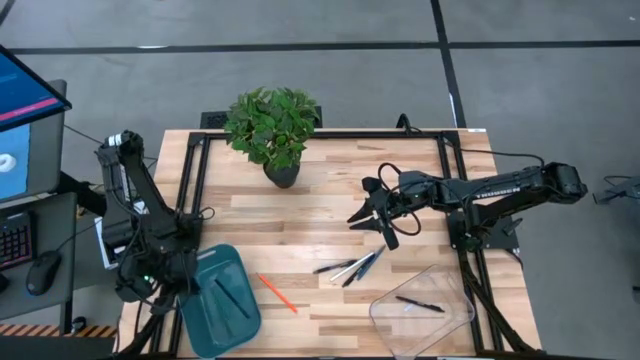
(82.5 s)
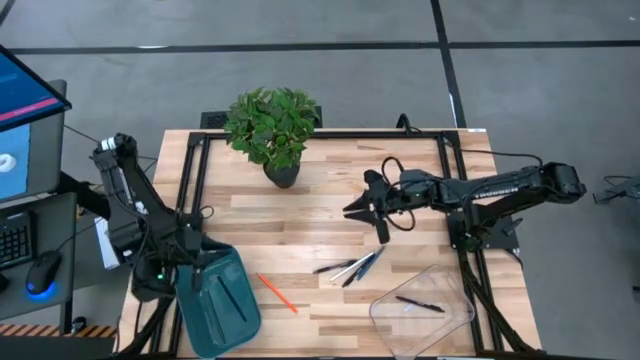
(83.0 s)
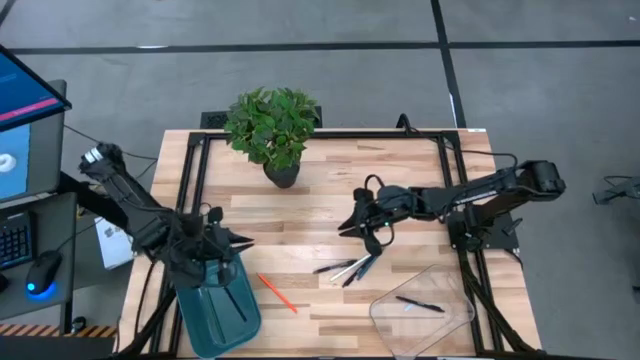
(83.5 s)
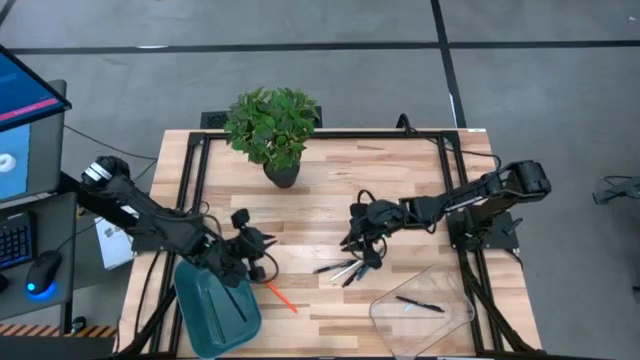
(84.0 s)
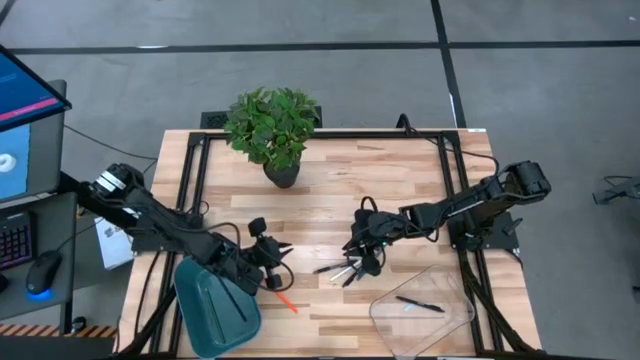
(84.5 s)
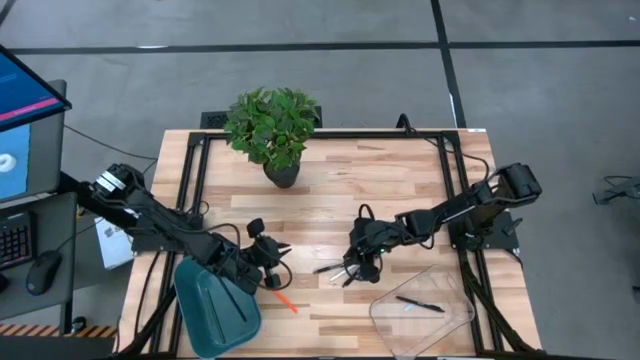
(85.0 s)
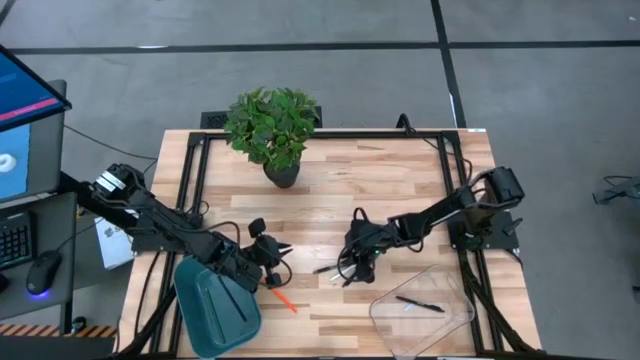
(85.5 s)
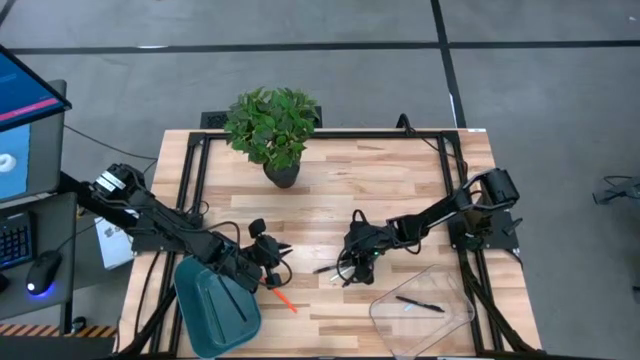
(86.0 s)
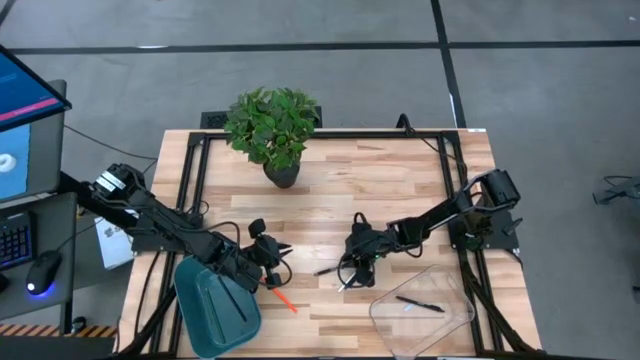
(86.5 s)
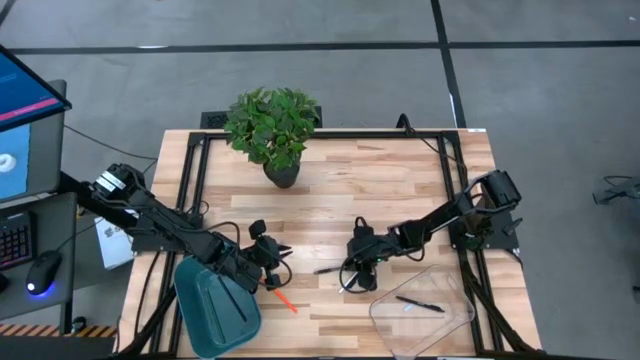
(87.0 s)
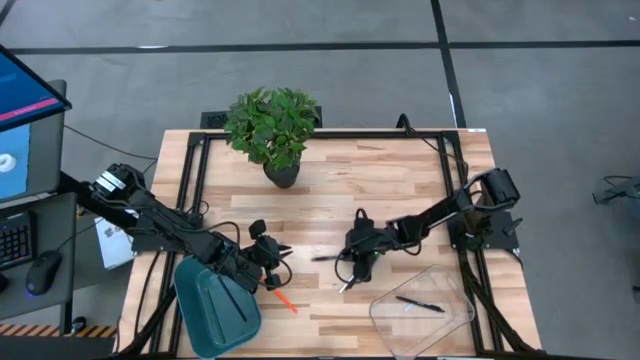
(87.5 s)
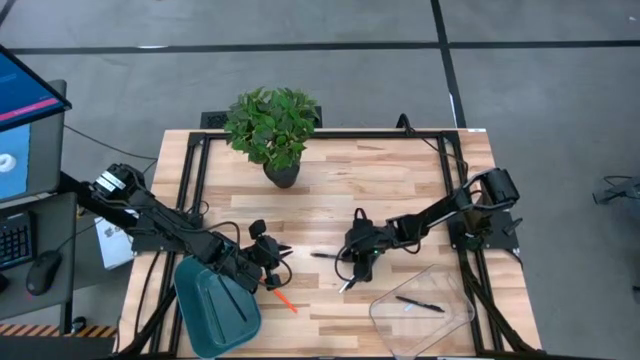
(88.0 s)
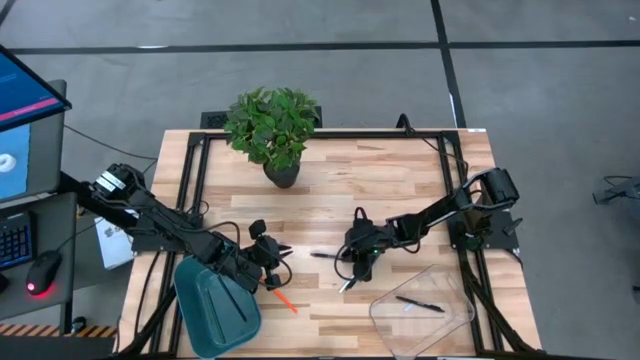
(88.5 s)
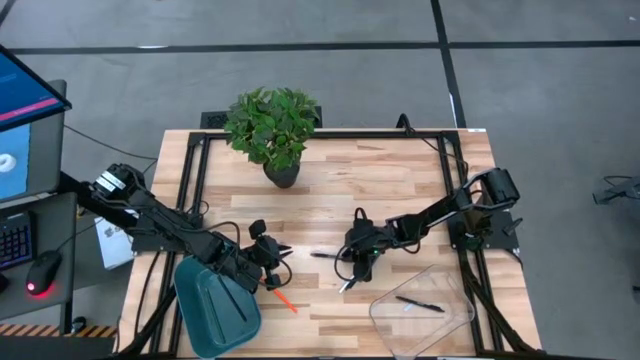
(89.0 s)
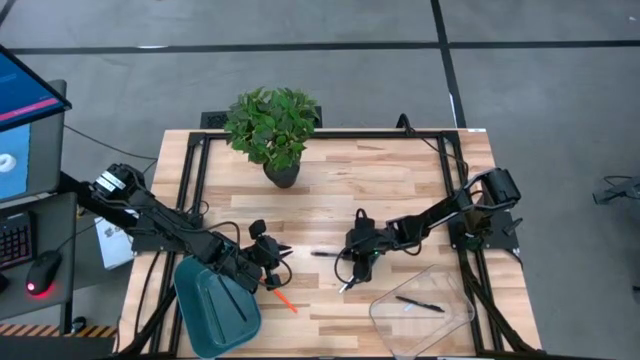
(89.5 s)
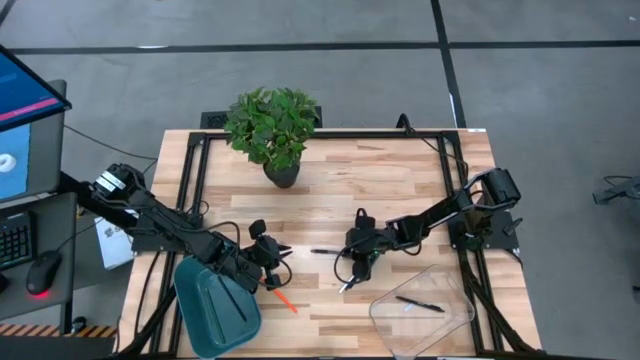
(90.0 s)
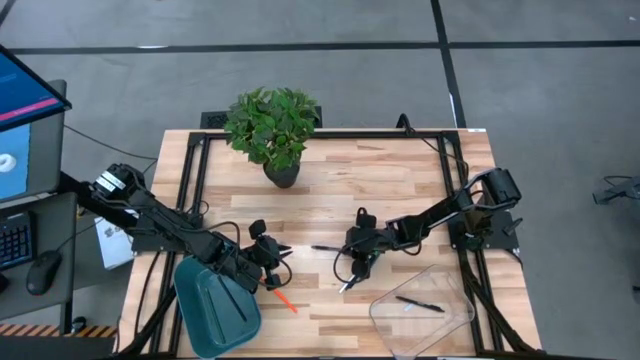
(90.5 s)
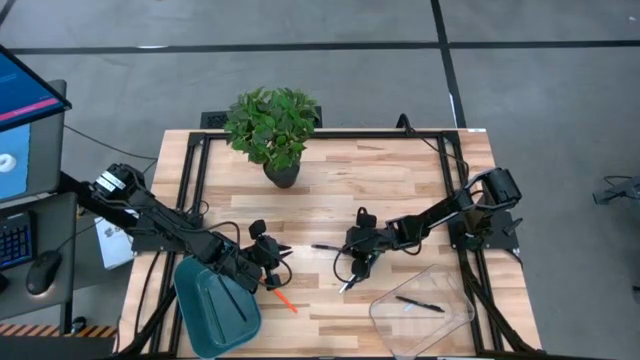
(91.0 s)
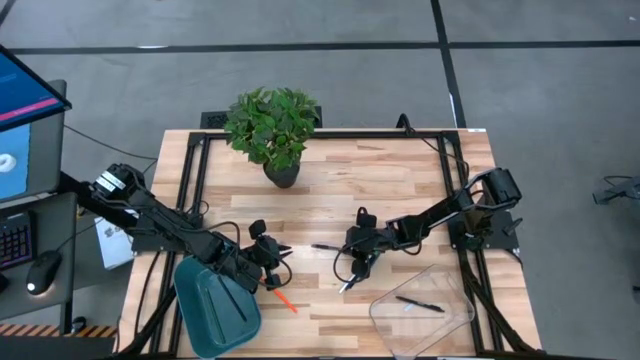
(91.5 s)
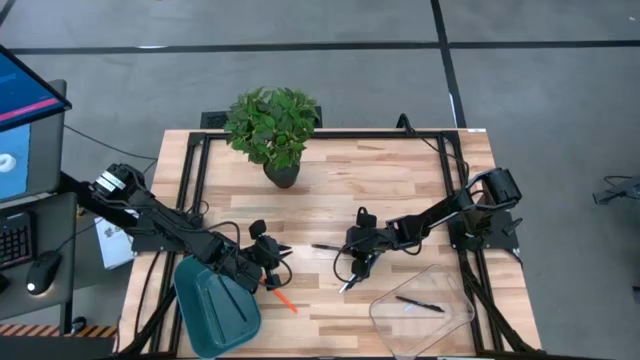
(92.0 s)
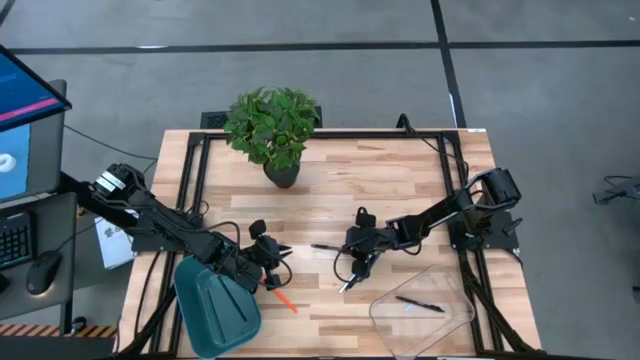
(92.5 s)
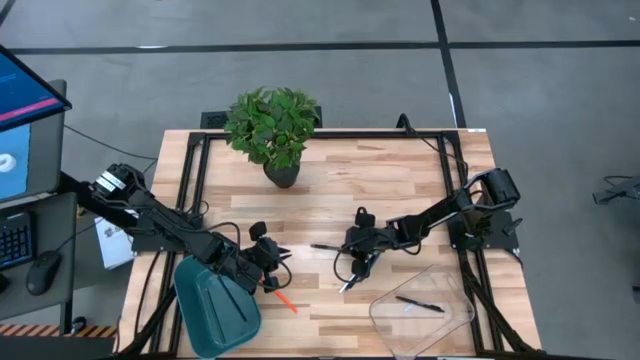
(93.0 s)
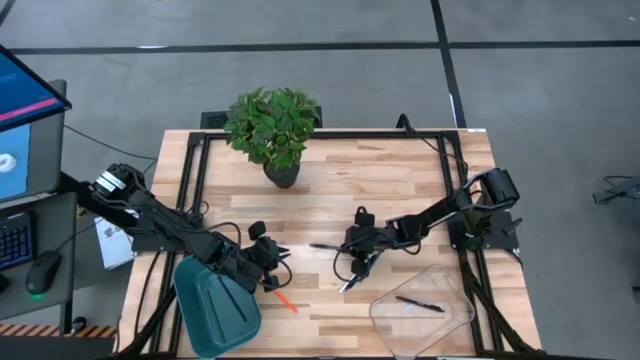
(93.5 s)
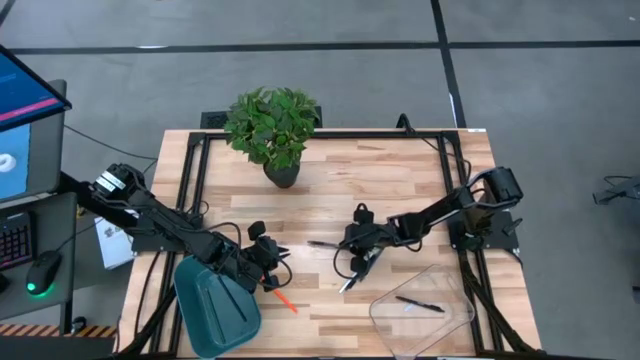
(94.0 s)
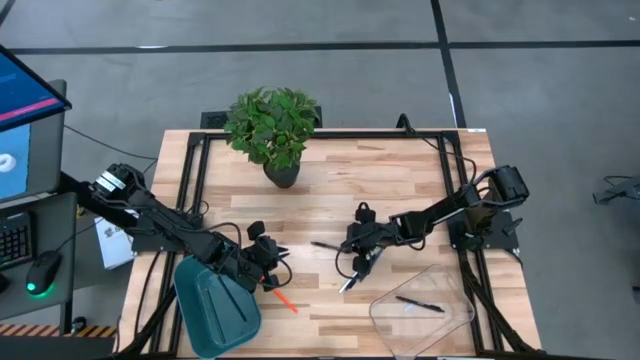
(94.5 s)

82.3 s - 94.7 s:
Task: Sort pens & pencils
Put the left black pen into the transparent bin

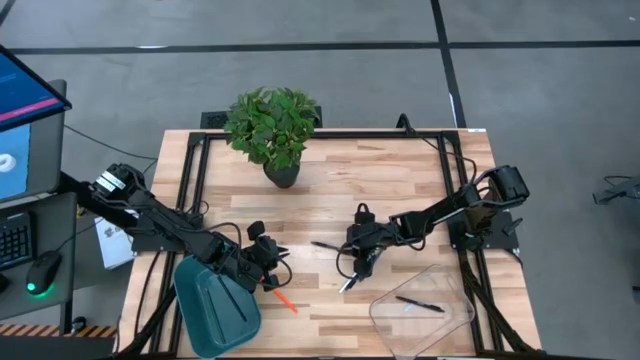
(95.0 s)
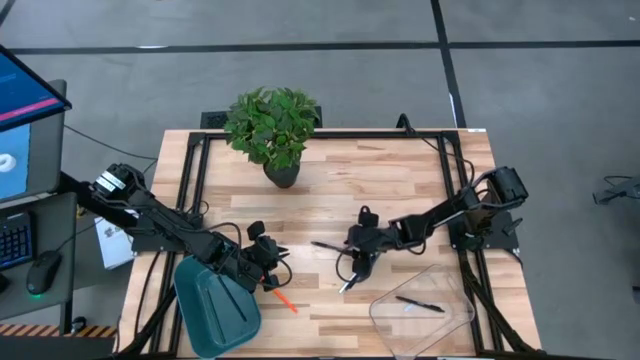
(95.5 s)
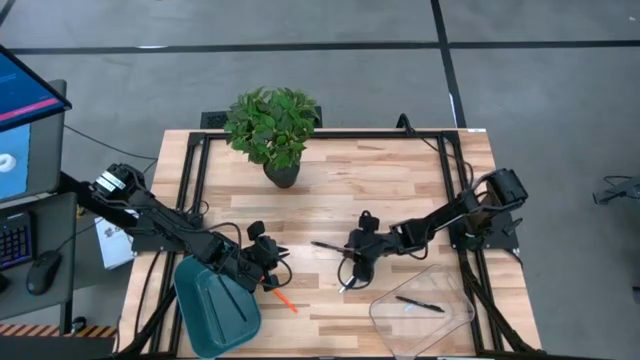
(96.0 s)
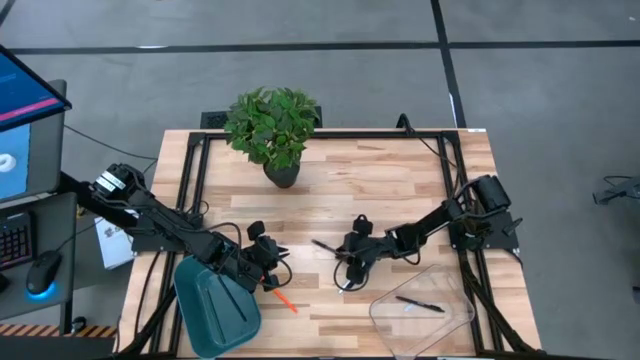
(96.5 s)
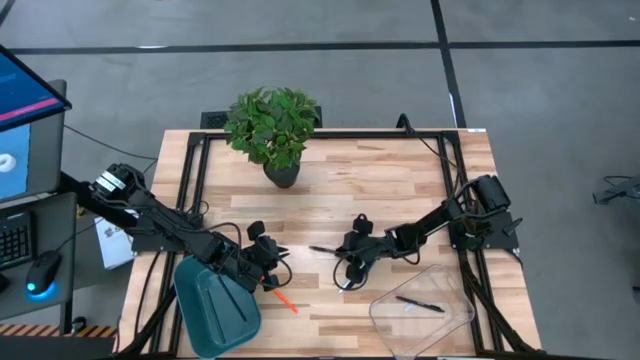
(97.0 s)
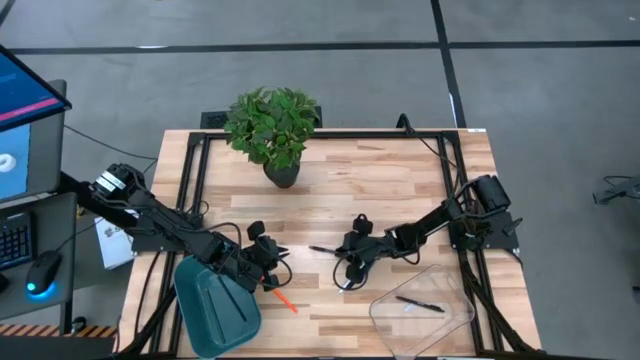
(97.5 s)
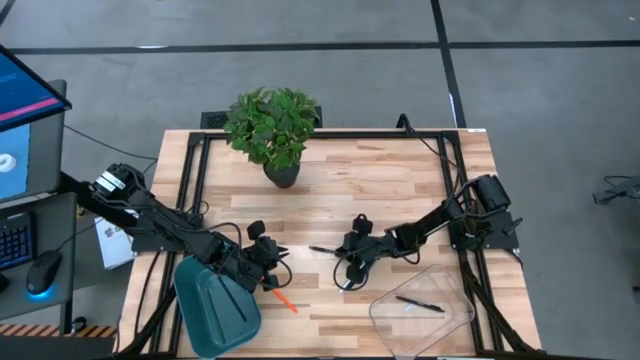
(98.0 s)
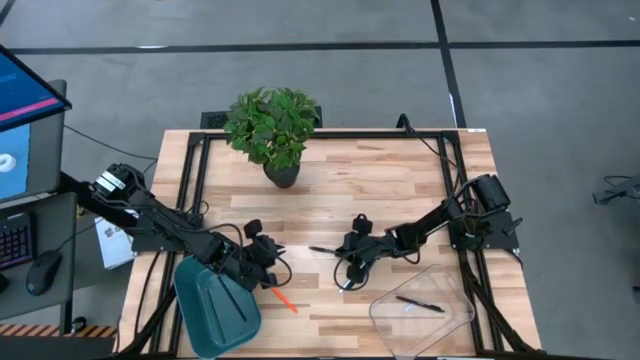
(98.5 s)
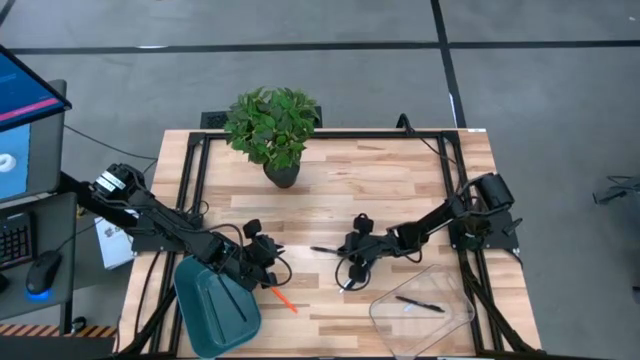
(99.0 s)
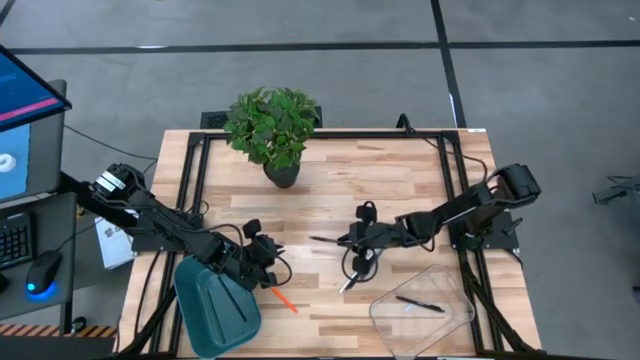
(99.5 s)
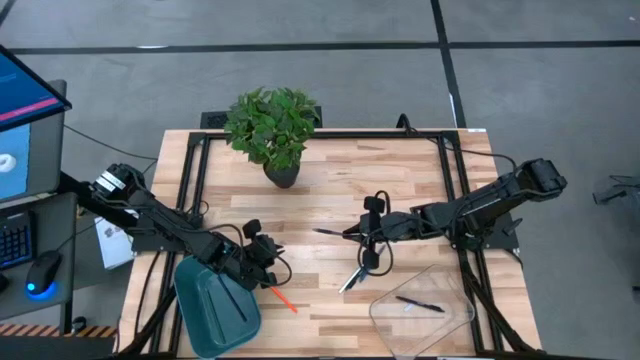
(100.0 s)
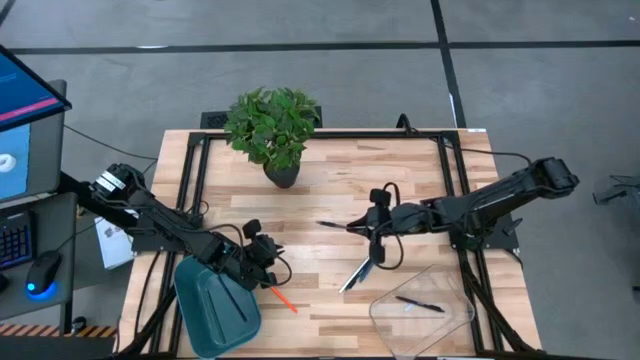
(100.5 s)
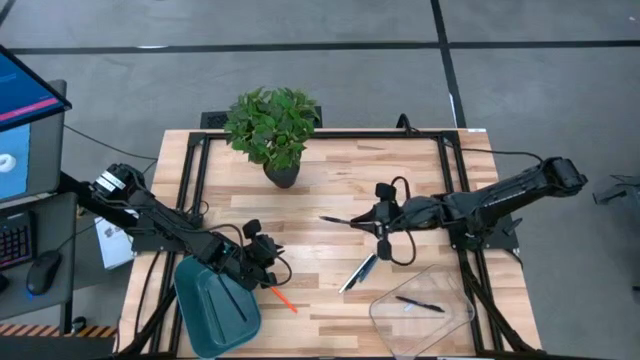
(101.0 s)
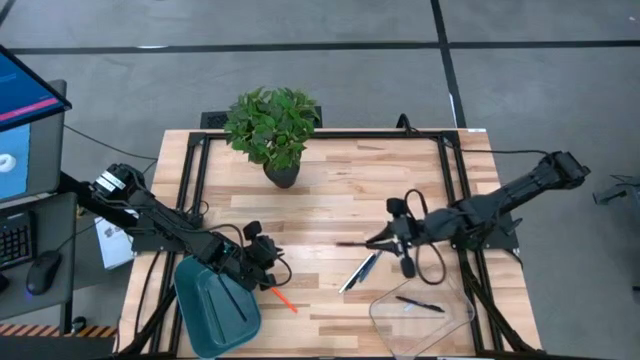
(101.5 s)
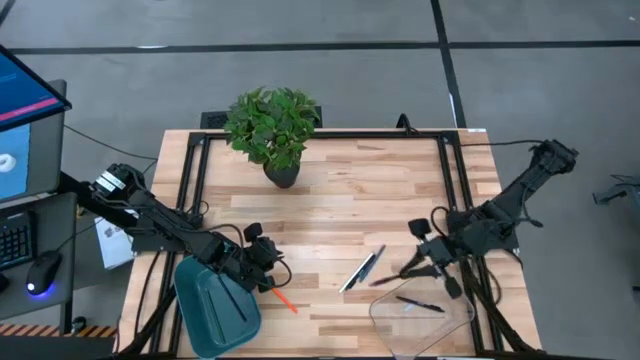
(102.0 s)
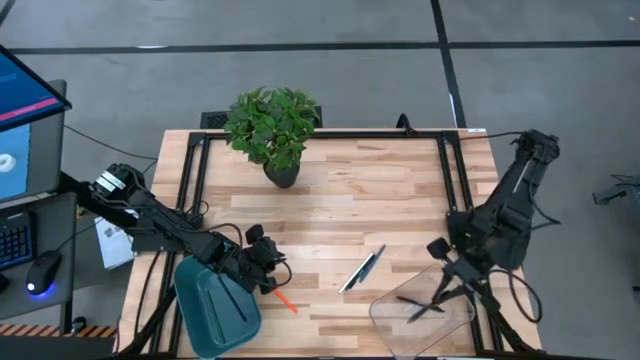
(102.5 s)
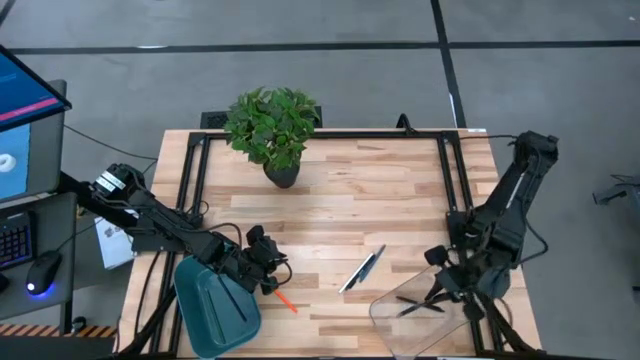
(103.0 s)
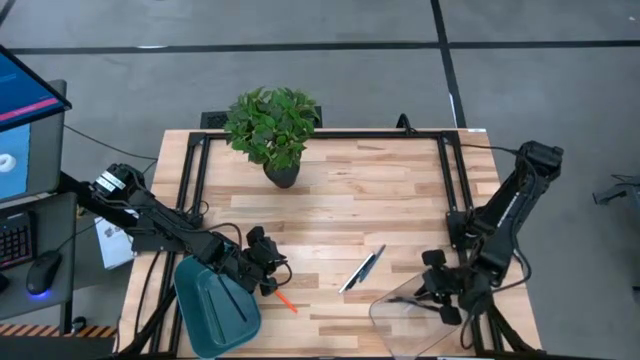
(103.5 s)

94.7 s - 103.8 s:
Put the left black pen into the transparent bin
